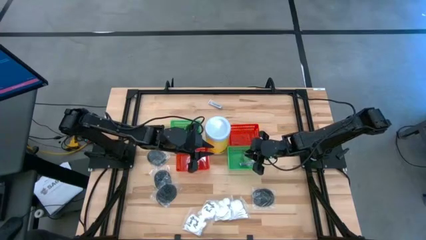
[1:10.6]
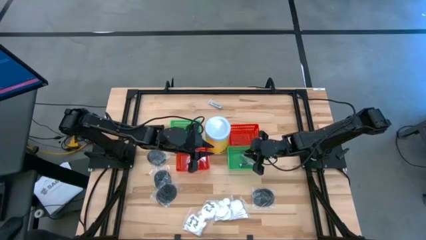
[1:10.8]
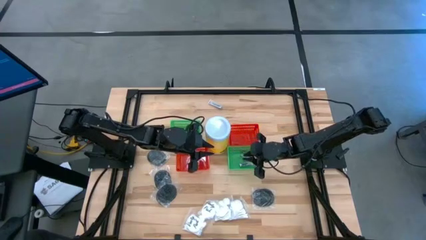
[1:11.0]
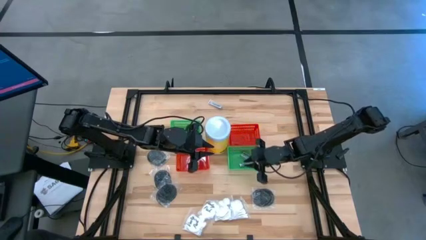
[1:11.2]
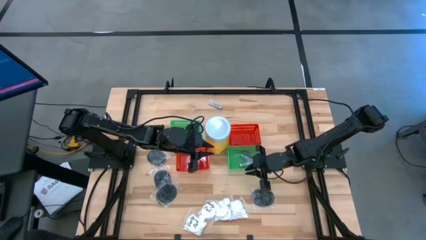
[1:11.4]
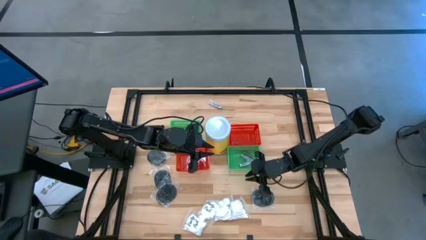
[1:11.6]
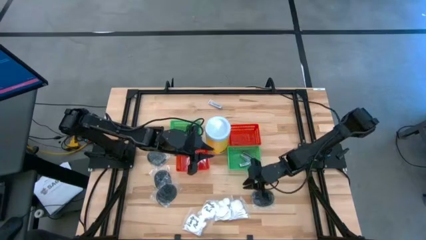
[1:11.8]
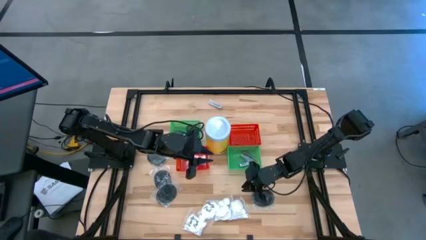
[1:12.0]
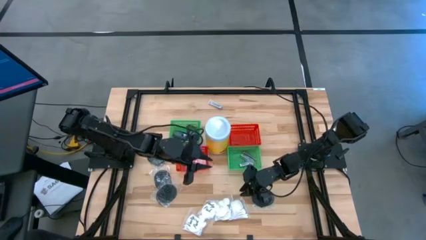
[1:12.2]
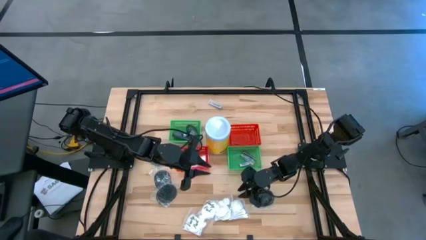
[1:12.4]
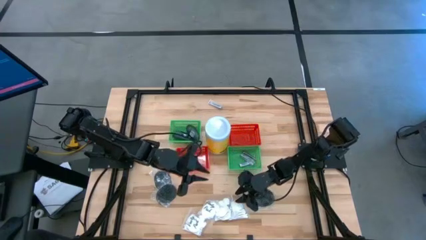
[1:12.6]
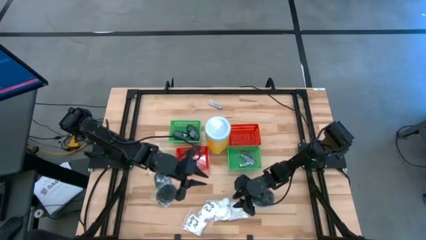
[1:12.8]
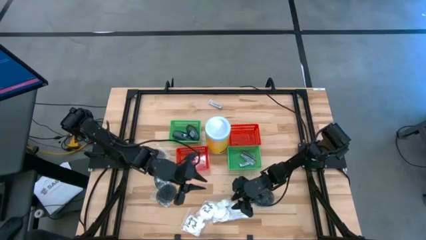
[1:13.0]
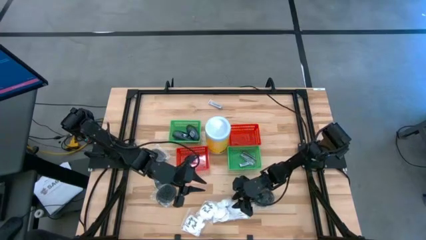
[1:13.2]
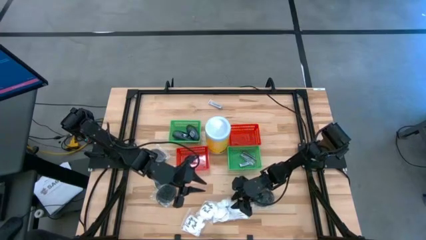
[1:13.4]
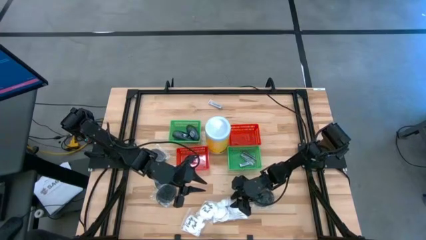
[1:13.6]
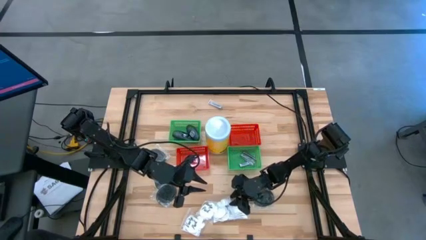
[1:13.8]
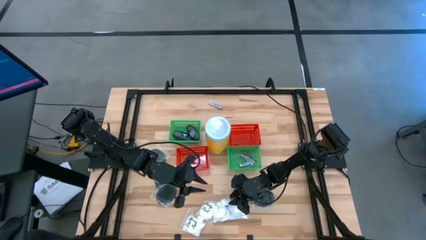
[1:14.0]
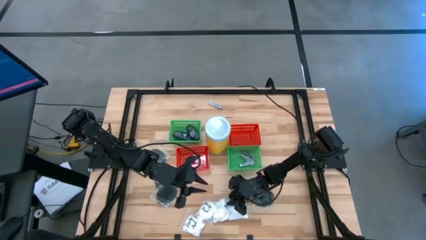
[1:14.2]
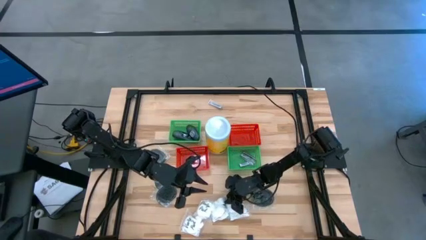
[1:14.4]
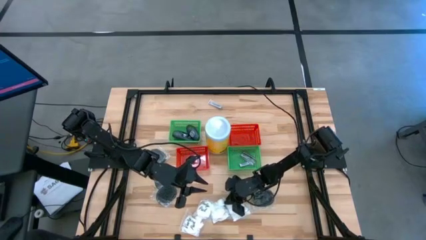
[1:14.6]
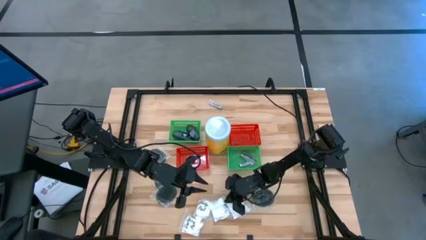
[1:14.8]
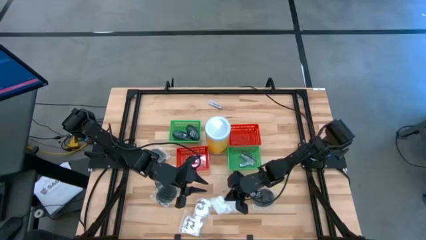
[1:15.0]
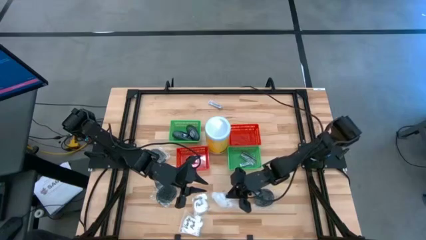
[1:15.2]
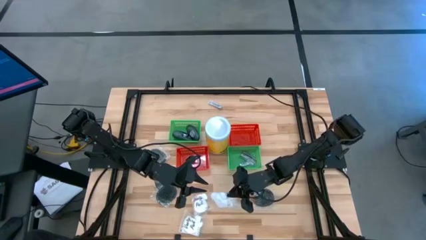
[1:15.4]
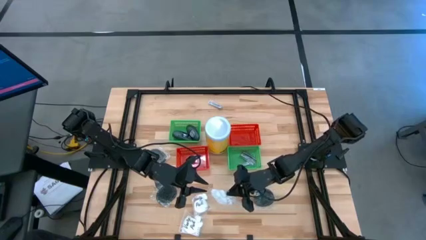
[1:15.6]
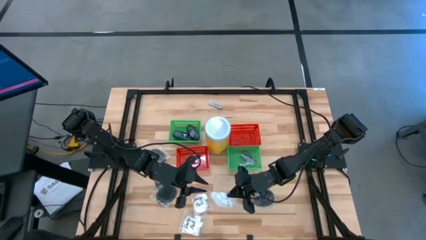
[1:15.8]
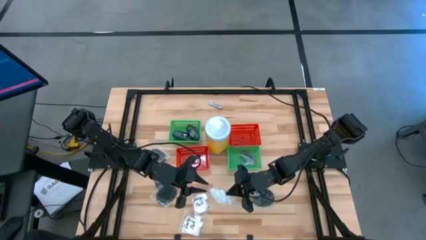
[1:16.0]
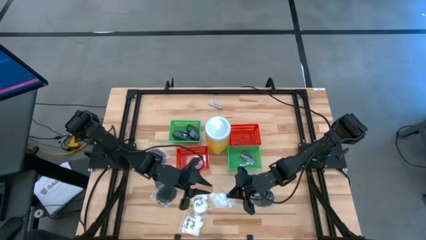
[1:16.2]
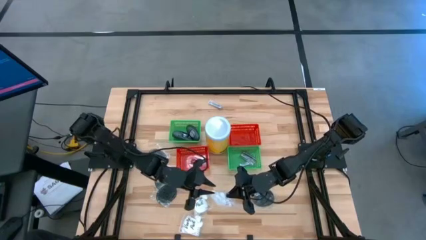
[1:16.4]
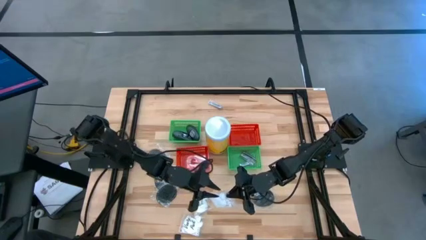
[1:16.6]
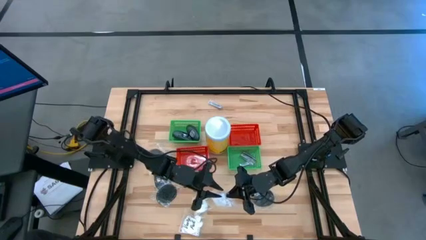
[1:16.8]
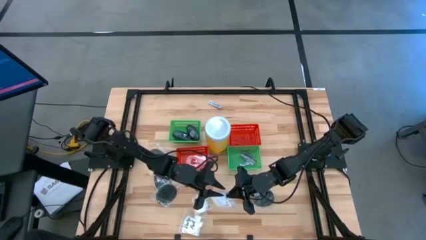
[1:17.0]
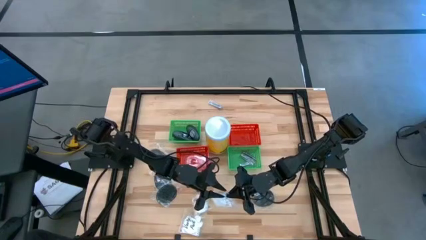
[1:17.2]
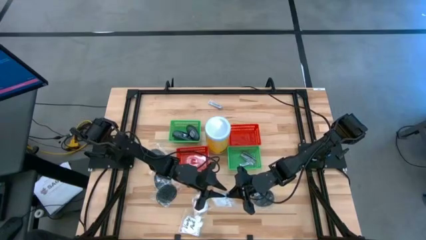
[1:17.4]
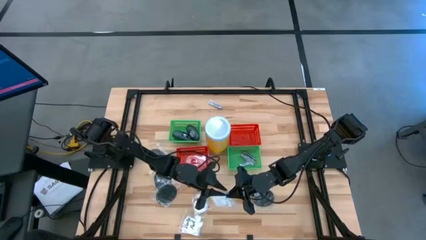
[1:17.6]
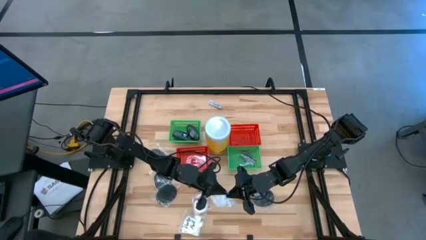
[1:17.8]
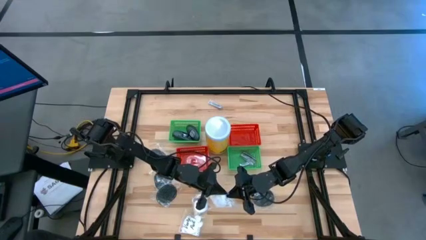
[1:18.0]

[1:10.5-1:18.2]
Task: Pick & Place Travel size toiletries
Put the transparent cotton pack into the left red bin

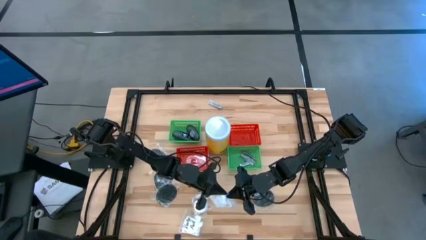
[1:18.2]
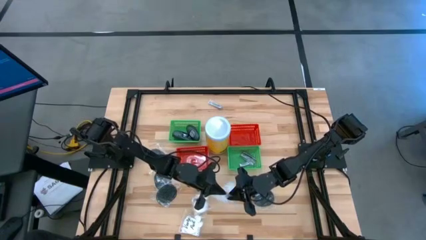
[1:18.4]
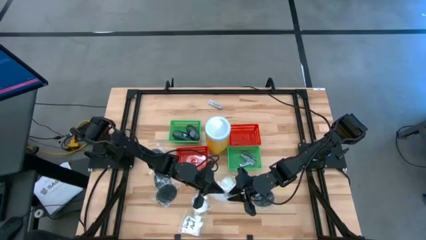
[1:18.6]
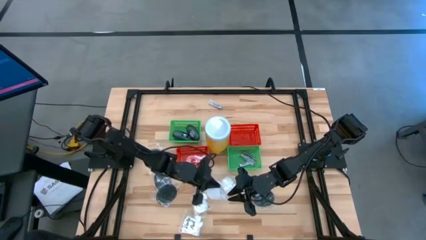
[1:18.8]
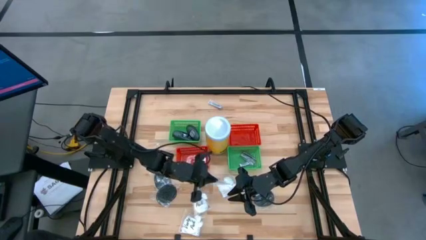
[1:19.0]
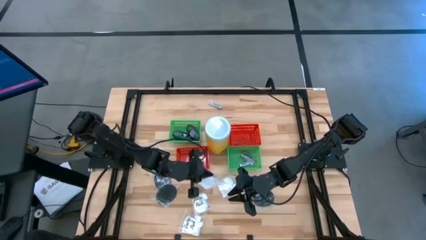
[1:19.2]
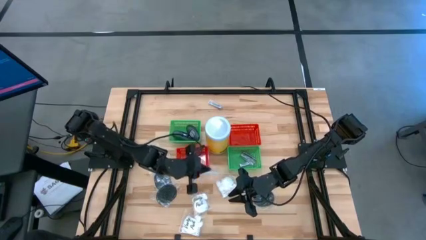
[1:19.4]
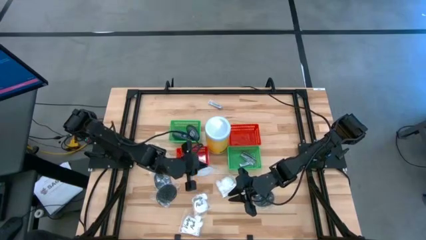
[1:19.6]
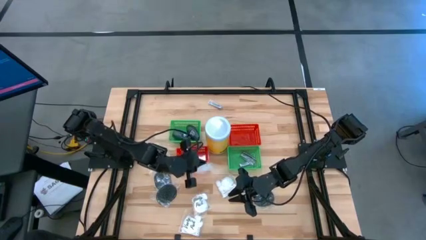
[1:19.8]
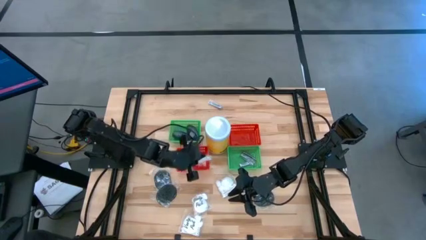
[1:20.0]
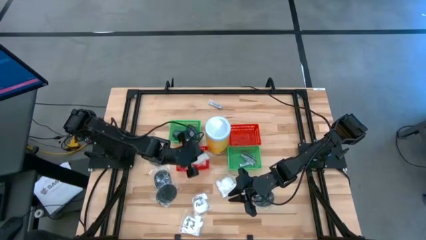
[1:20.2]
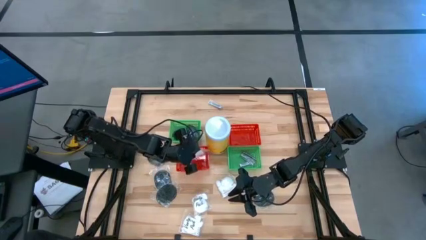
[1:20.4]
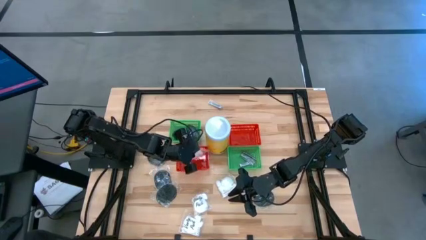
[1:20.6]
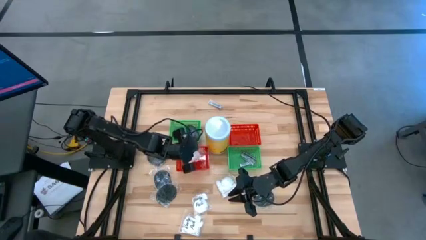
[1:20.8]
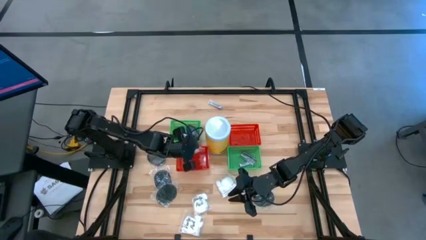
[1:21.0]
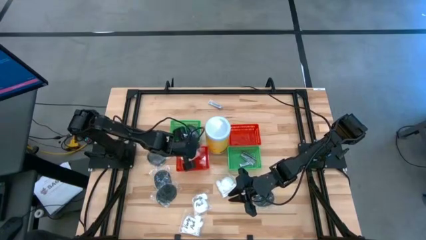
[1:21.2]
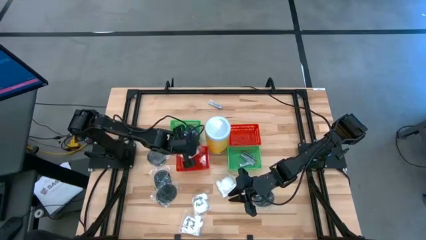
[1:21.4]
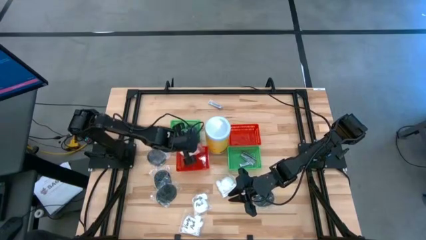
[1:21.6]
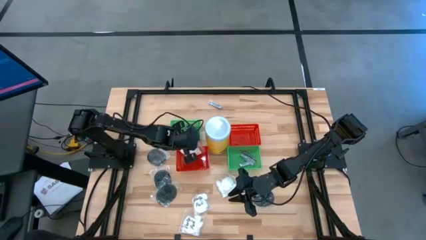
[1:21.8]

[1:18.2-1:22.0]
Put the transparent cotton pack into the left red bin
